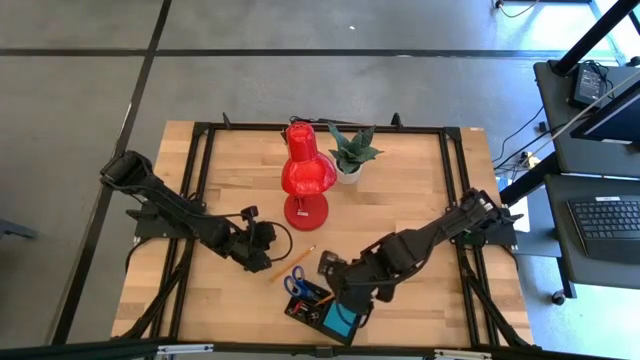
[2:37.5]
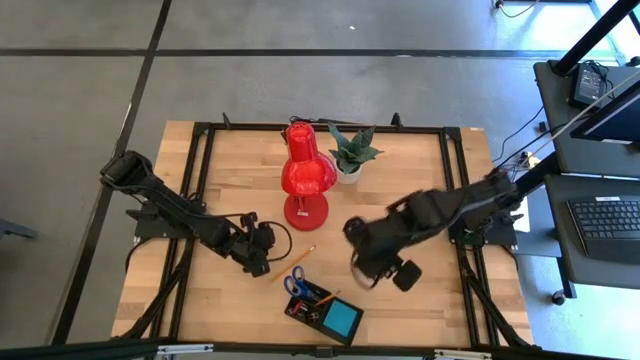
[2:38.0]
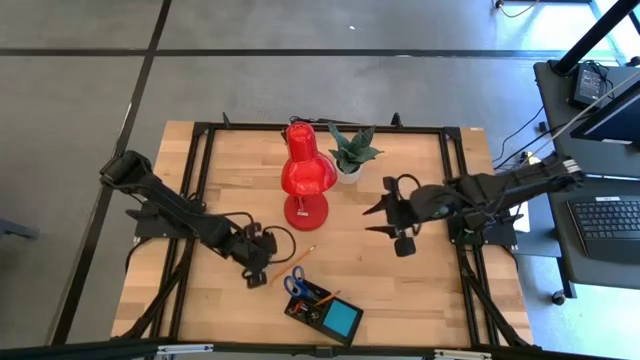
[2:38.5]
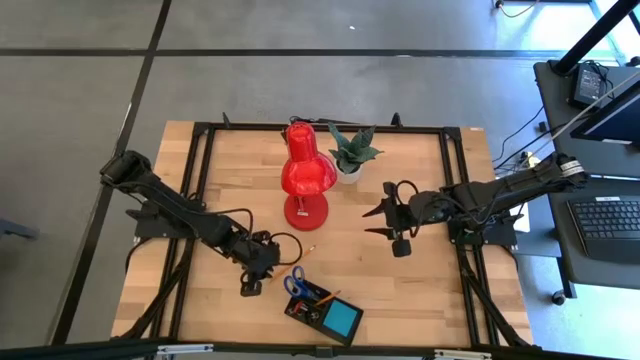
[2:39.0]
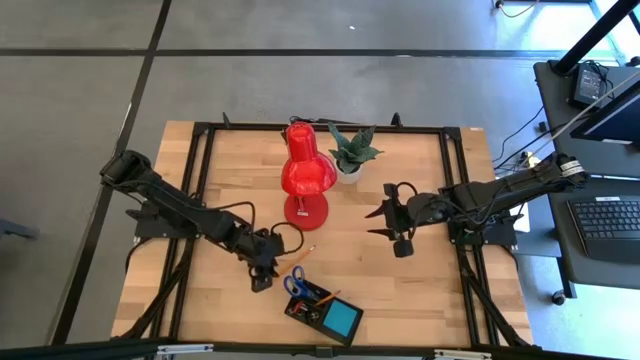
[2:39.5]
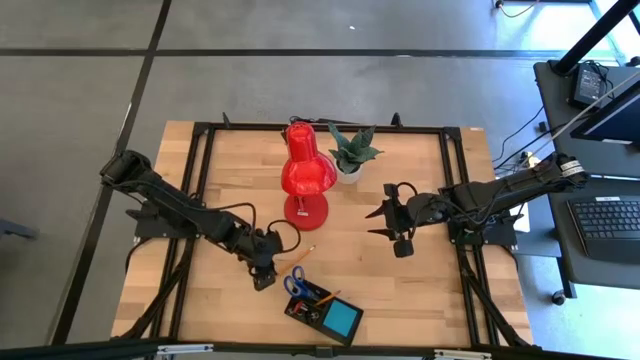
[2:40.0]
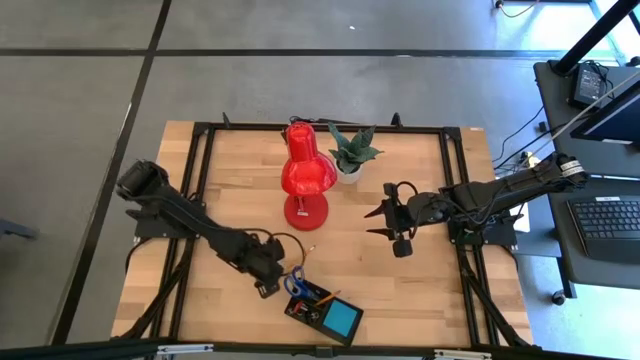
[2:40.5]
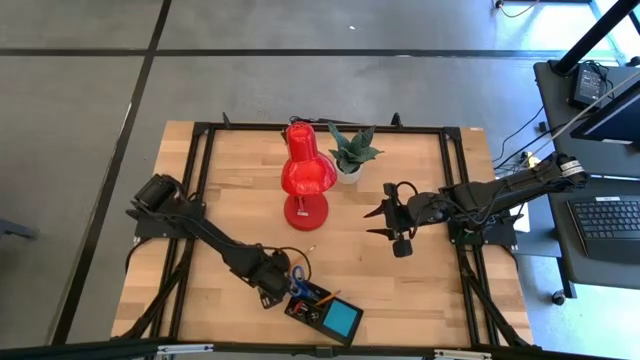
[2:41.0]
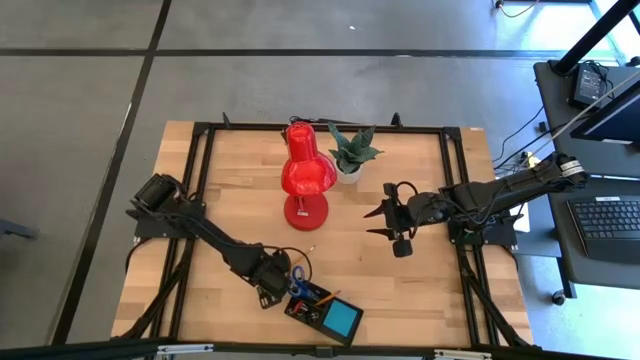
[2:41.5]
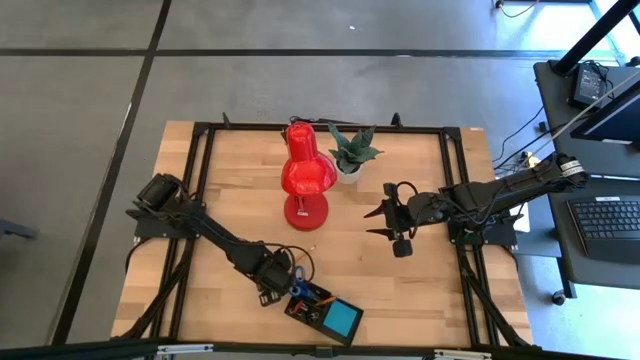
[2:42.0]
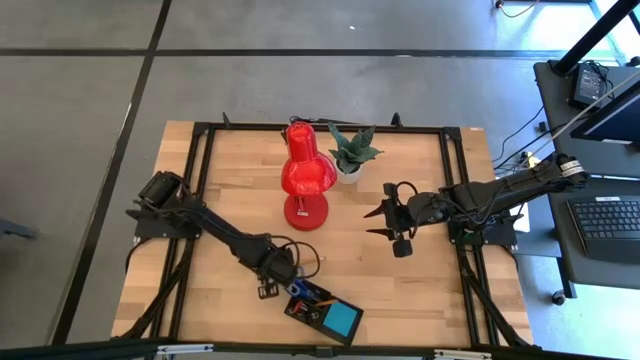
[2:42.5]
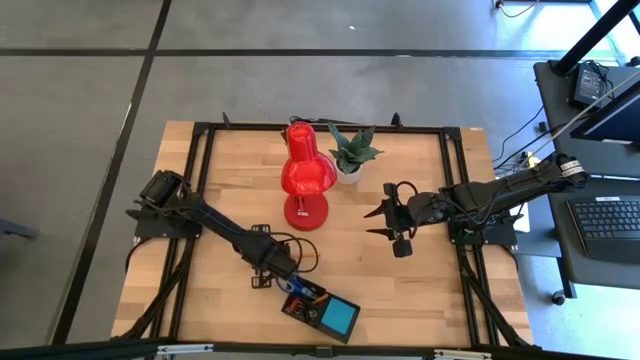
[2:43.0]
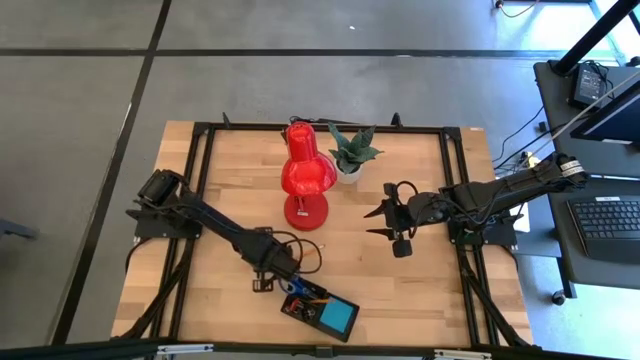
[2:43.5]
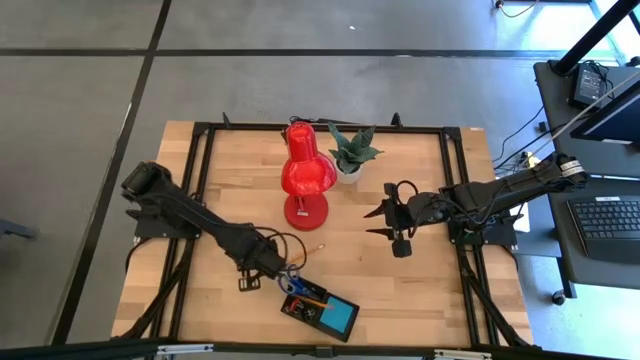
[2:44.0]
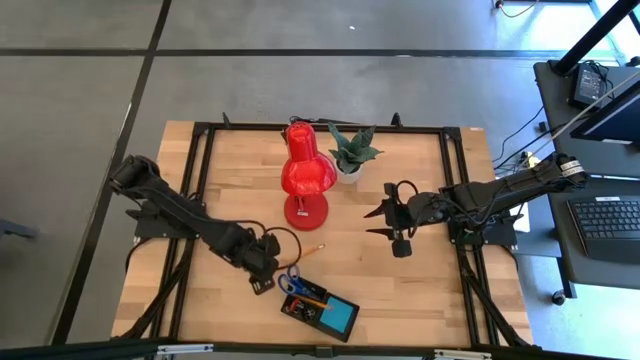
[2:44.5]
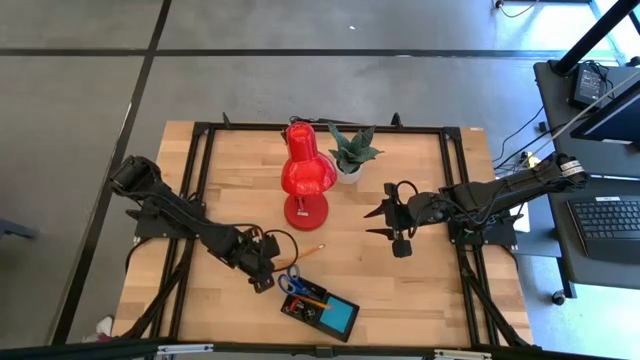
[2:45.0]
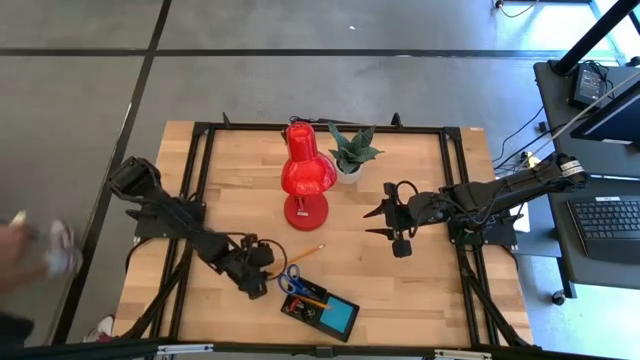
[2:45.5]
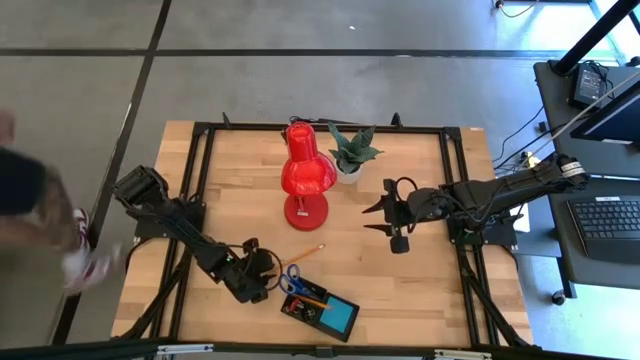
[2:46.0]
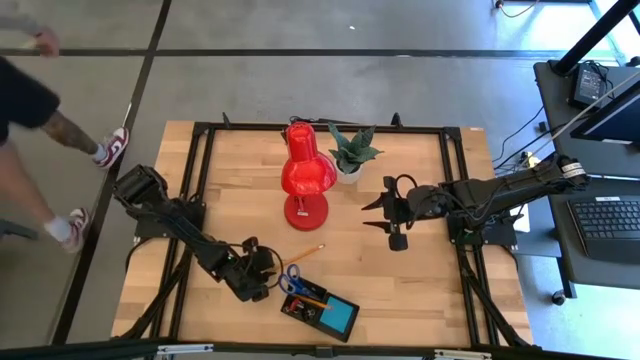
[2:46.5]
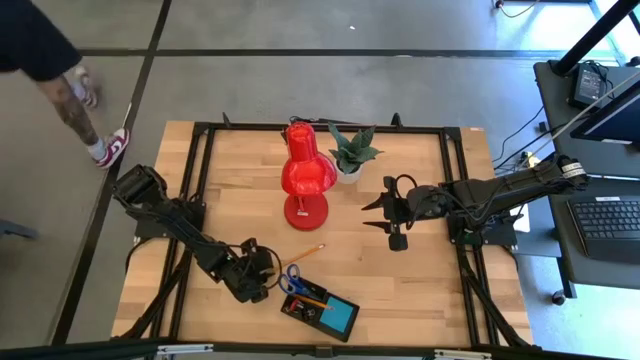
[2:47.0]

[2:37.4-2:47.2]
Task: Pick and place office supplies into organizer
Put the orange pencil into the black desk organizer

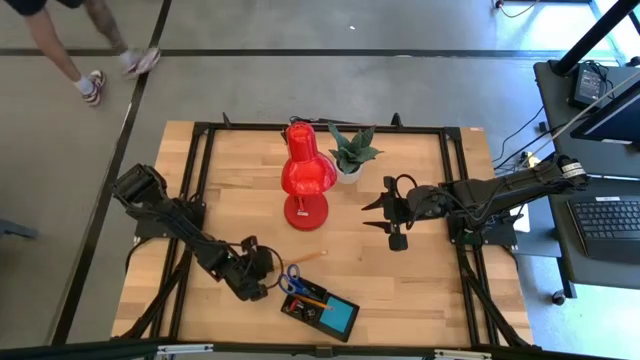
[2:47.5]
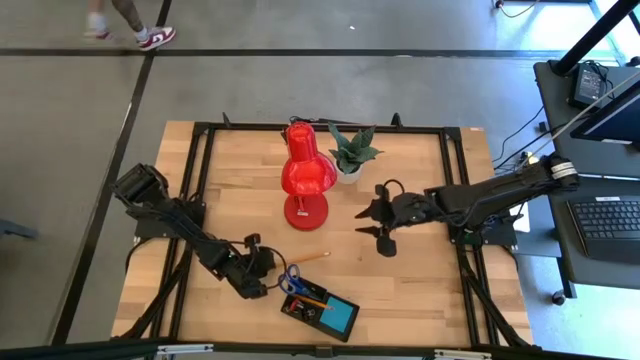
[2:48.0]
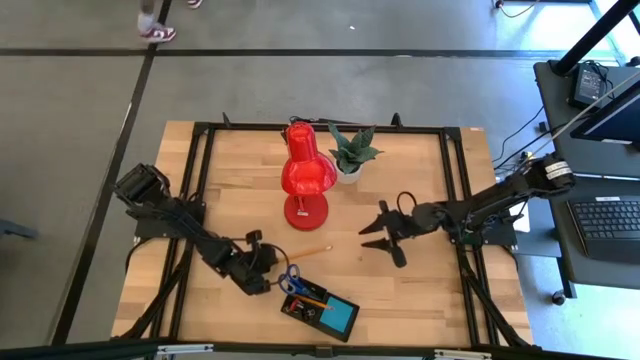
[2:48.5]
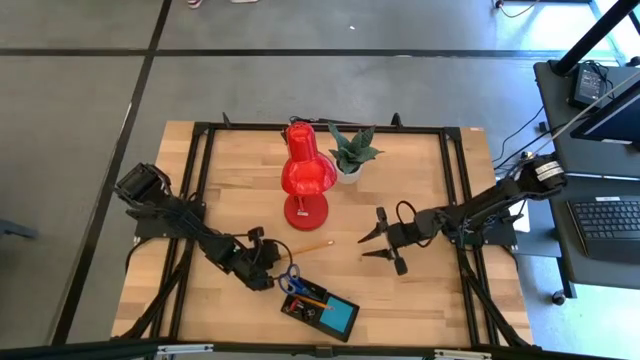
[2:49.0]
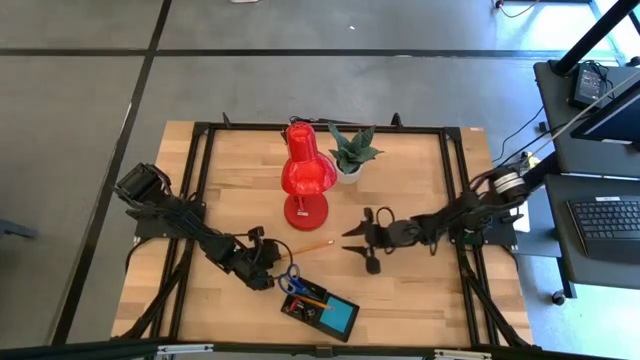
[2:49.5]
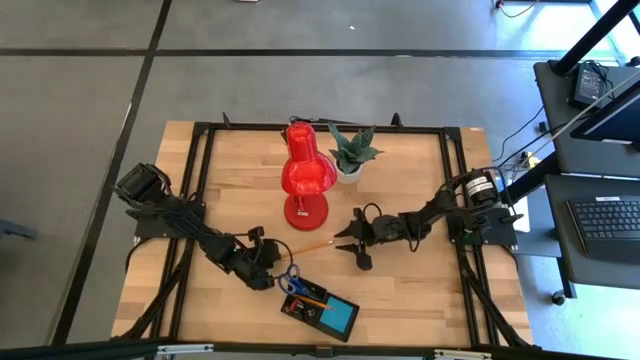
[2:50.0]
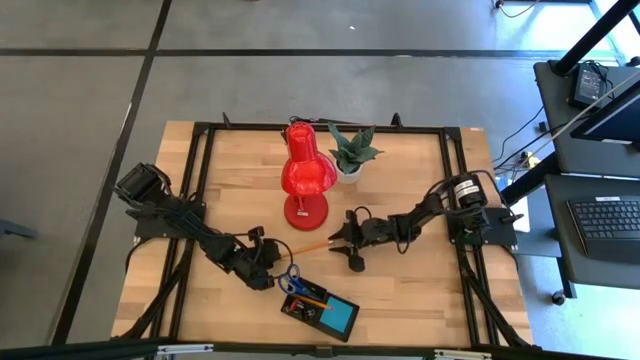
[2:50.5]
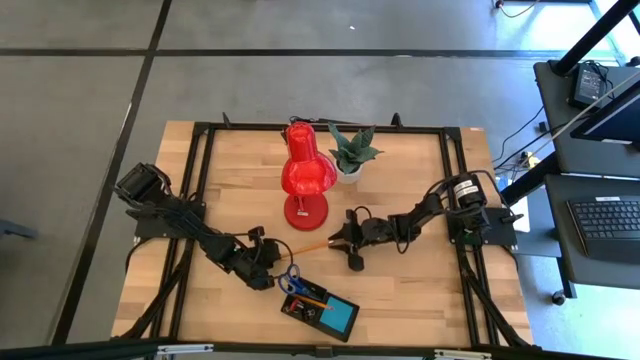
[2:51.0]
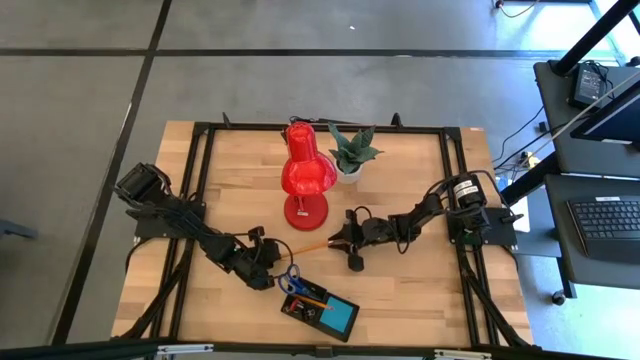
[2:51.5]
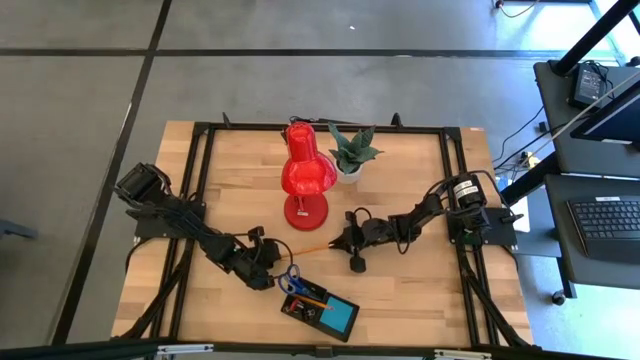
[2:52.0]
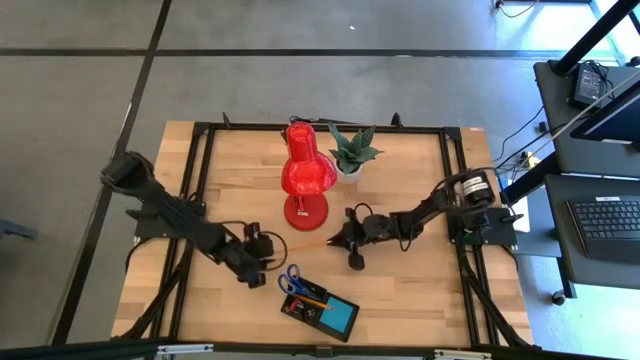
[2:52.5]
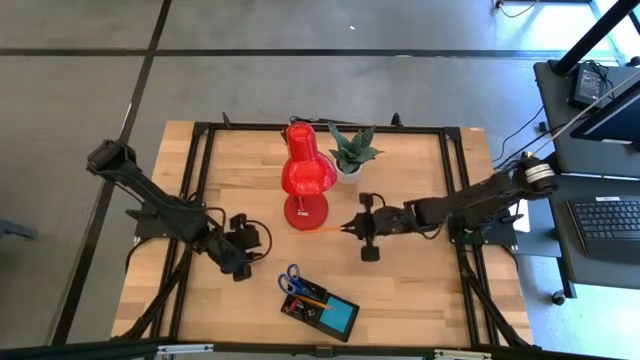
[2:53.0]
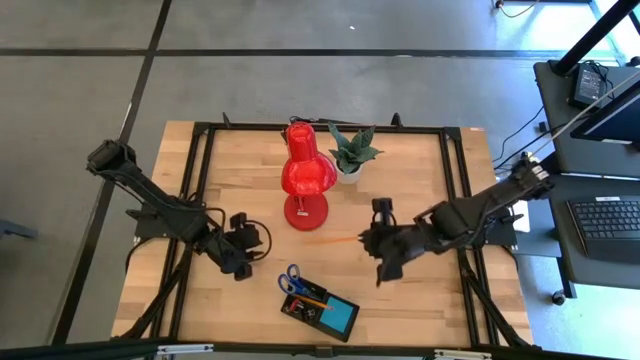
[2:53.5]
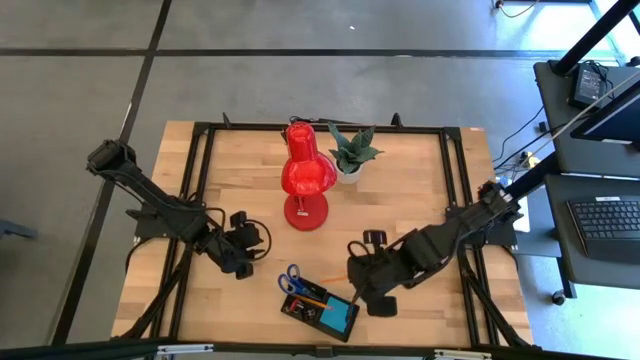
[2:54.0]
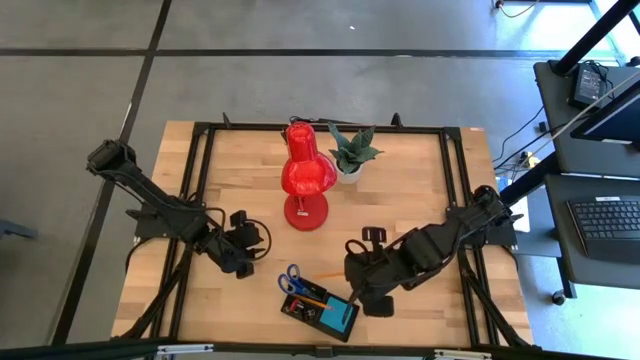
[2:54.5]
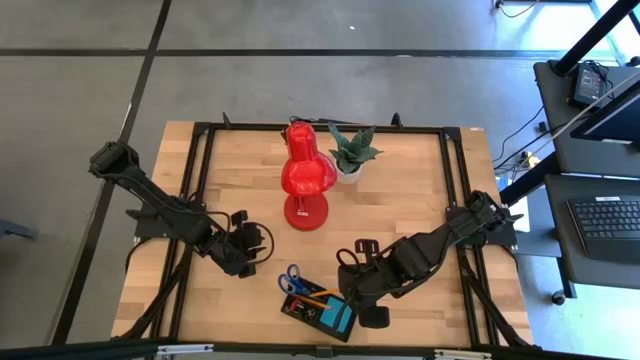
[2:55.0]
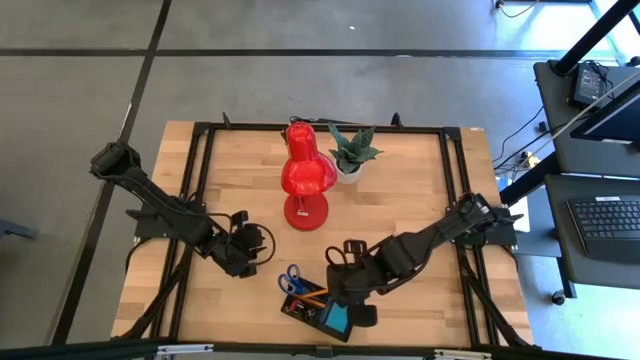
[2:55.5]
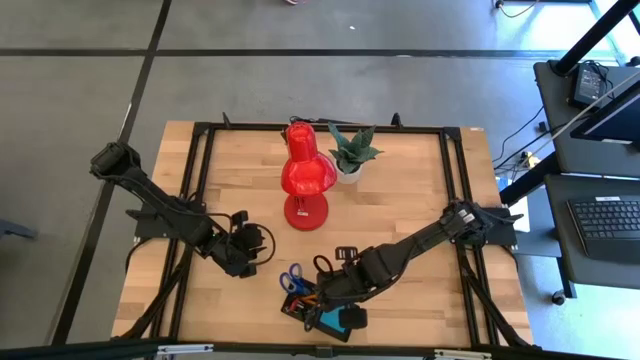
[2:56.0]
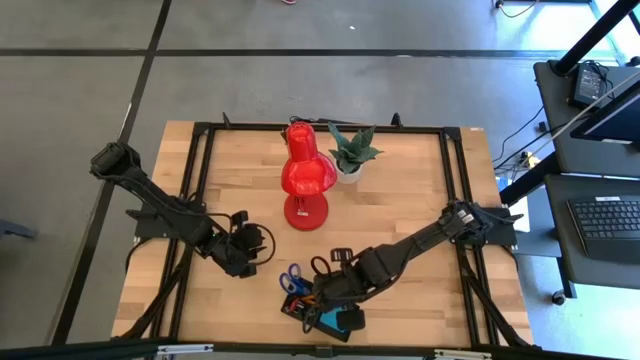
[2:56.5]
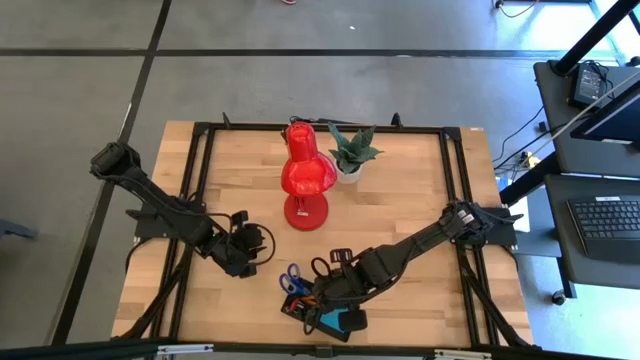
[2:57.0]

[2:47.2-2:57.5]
Put the orange pencil into the black desk organizer

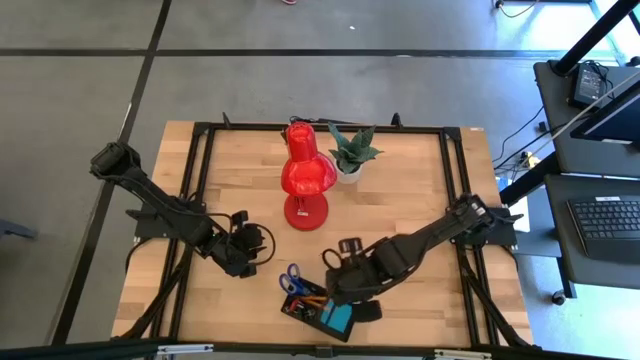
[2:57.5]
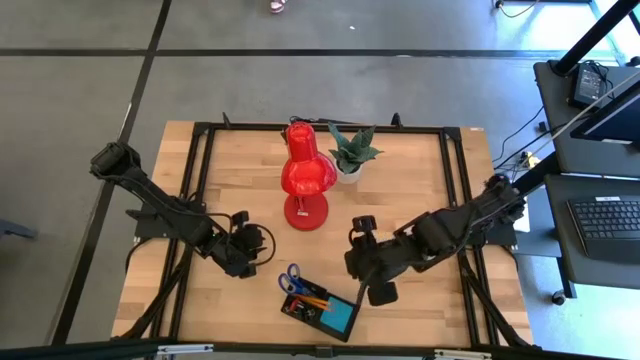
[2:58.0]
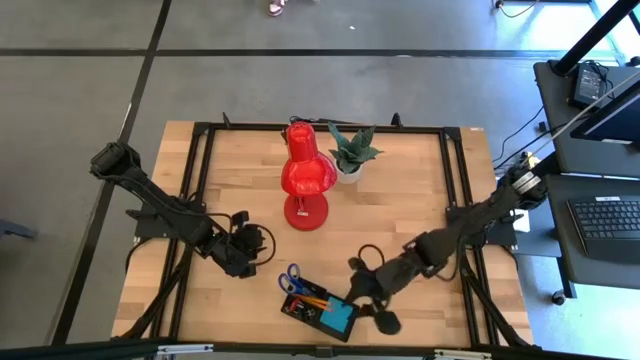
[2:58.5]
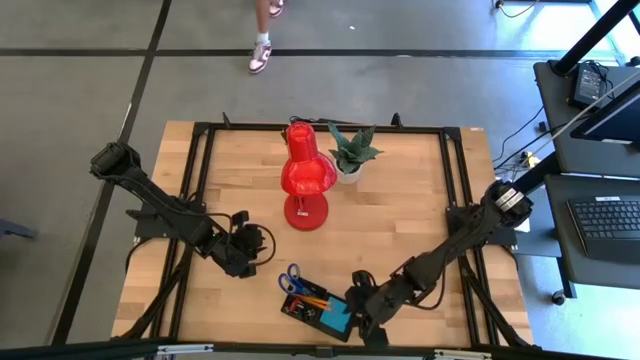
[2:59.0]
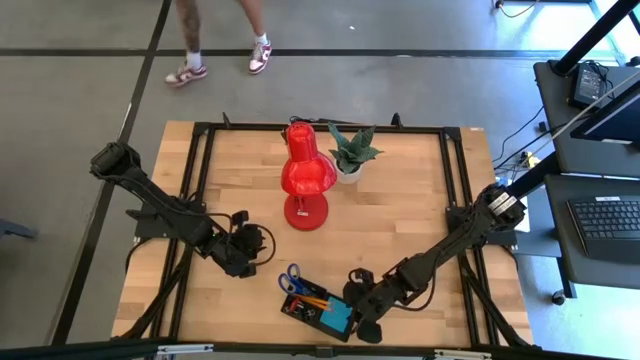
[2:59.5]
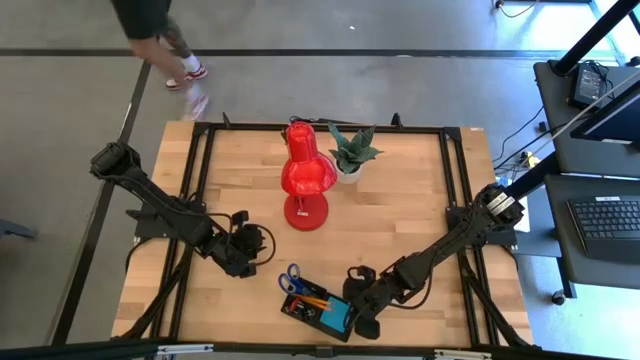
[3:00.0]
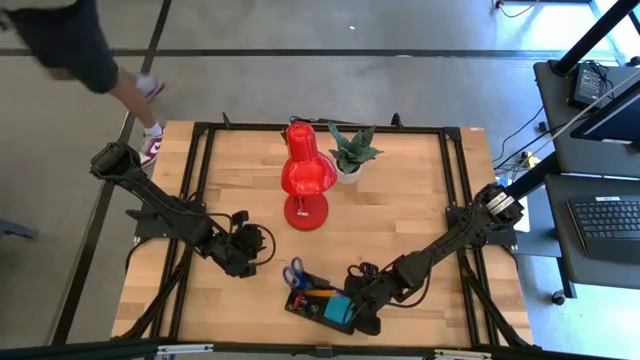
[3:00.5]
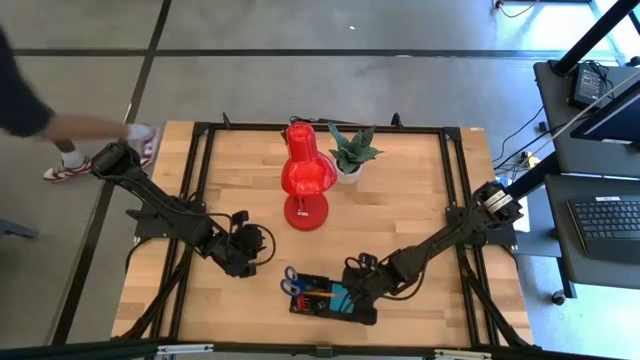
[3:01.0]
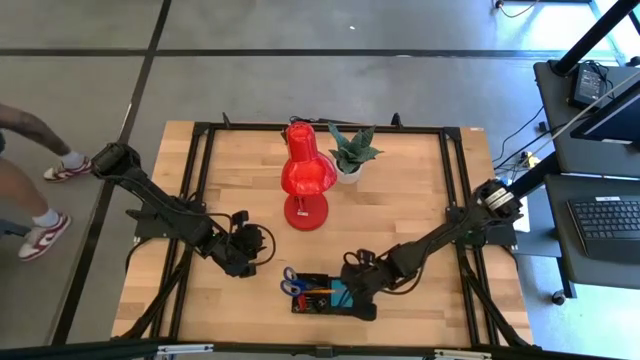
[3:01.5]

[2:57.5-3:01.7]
Adjust the black desk organizer
